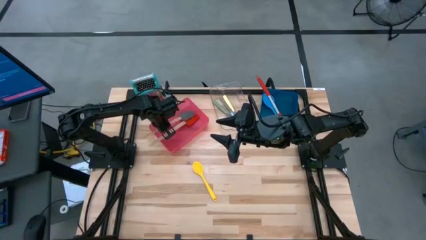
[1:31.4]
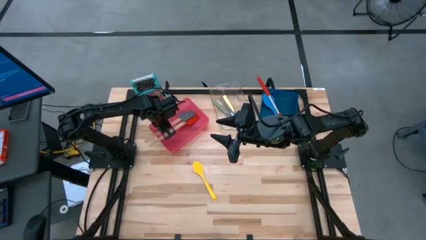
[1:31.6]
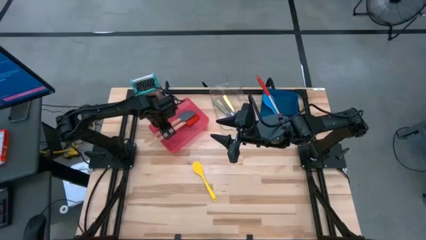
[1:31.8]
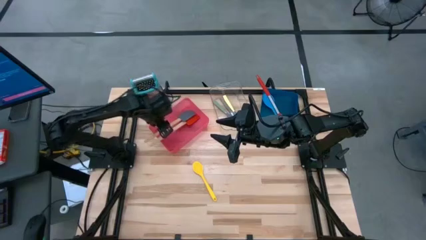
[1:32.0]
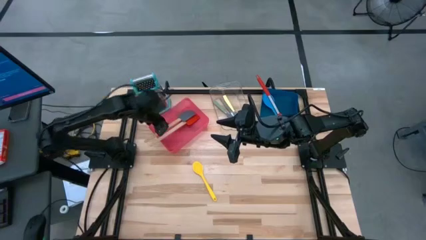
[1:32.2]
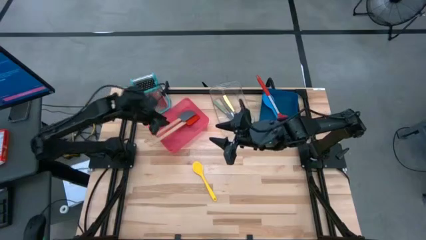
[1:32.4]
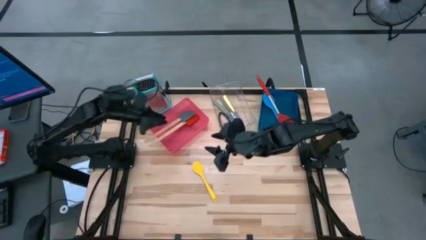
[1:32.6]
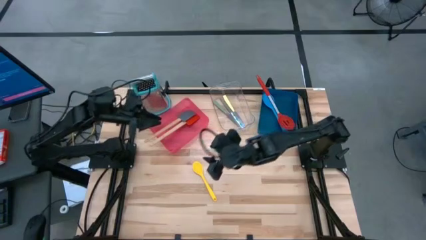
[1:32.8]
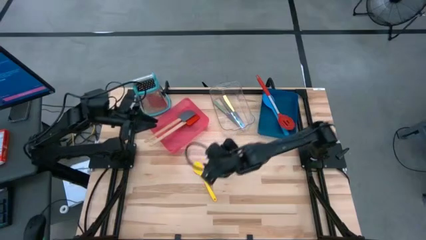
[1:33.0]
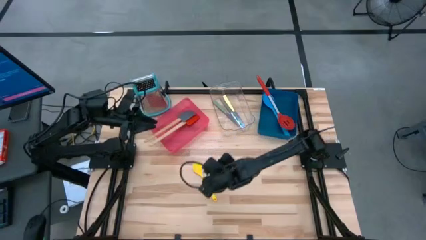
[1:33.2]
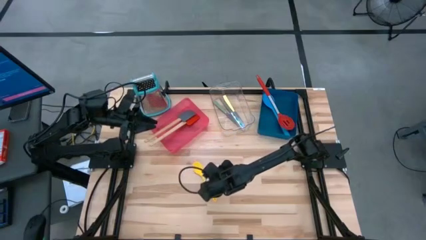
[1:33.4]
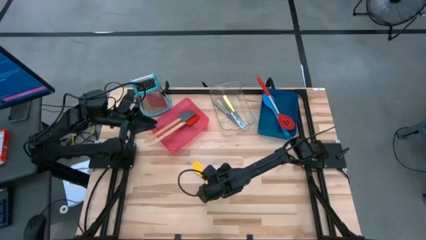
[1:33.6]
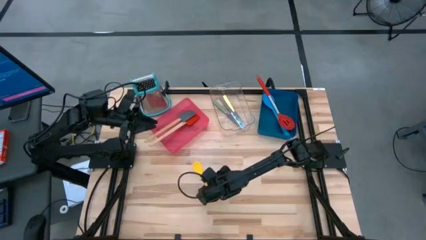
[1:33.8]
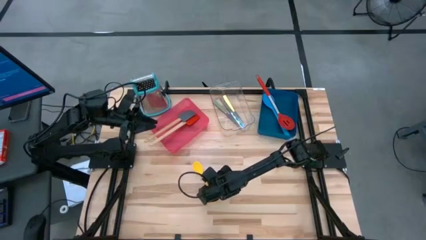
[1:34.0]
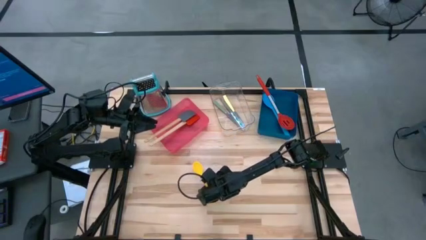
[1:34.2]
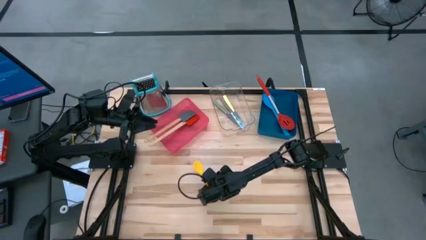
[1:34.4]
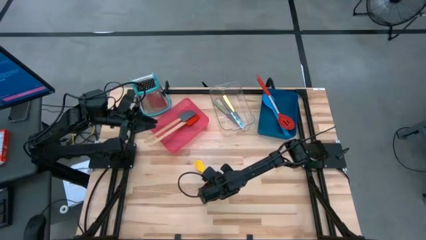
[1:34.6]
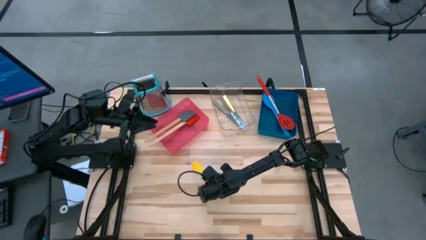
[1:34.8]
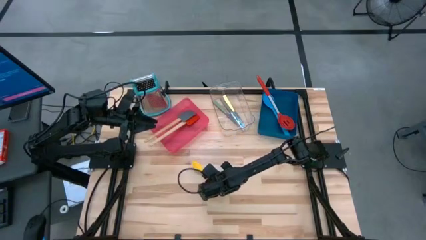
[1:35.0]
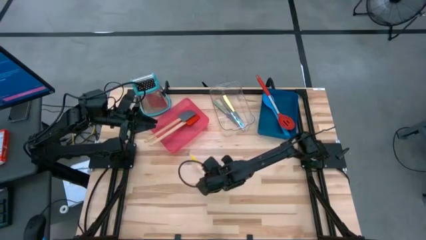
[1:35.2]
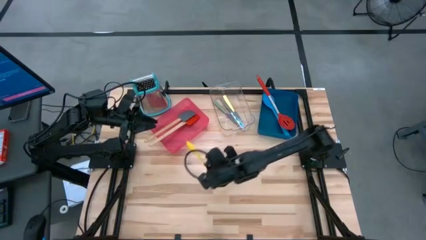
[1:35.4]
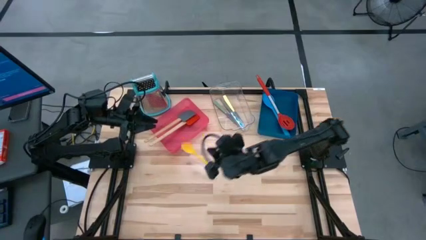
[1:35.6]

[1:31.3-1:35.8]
Task: Pick & Place Kitchen Items
Put the yellow serving spoon into the blue bin

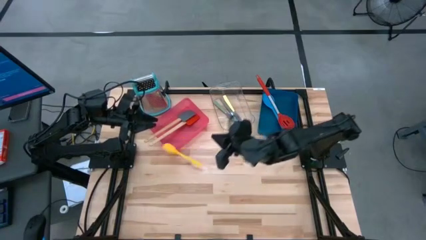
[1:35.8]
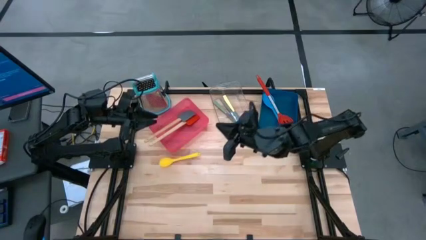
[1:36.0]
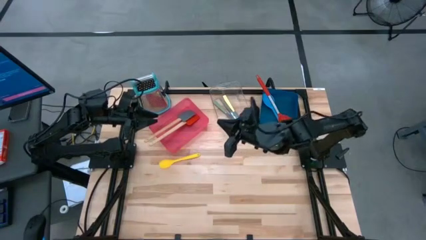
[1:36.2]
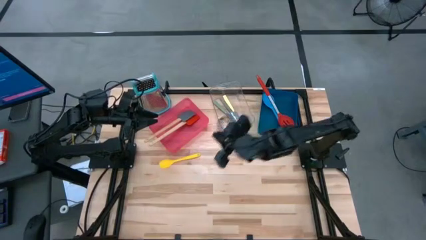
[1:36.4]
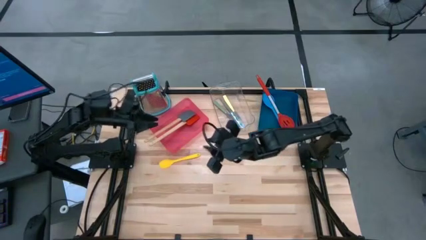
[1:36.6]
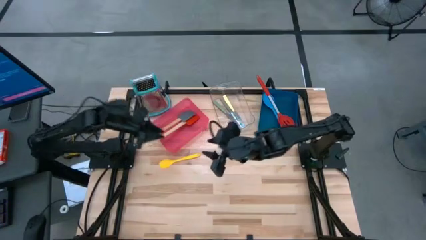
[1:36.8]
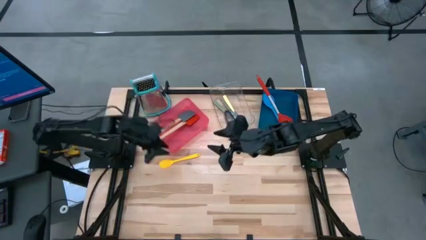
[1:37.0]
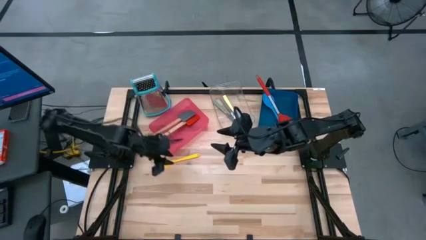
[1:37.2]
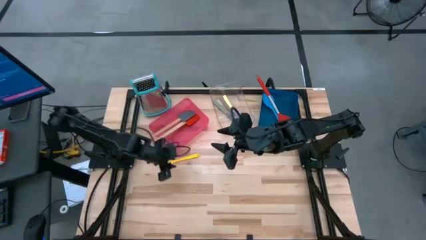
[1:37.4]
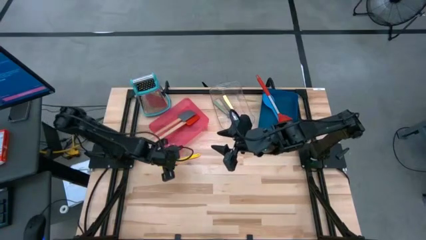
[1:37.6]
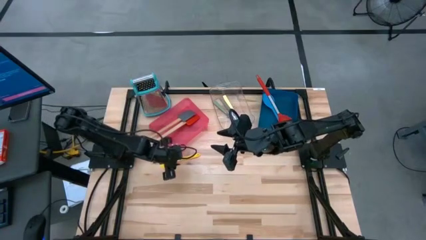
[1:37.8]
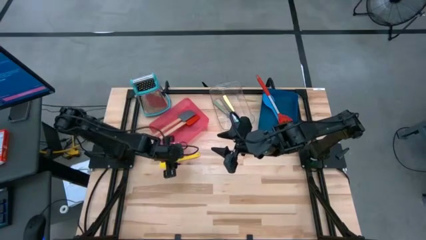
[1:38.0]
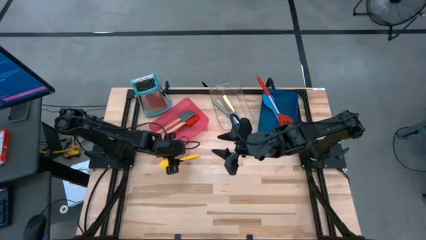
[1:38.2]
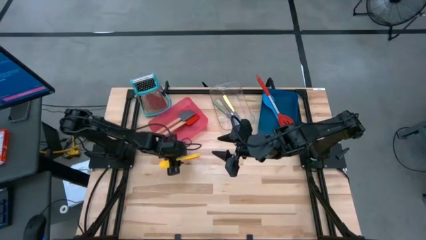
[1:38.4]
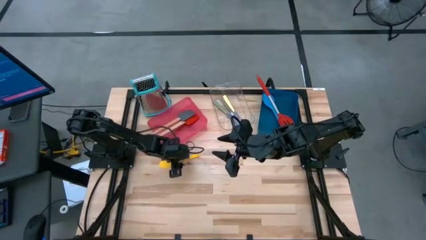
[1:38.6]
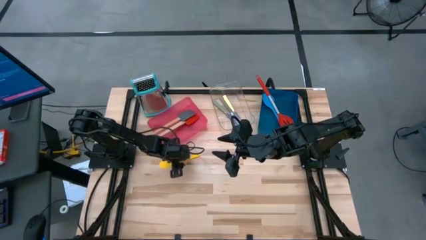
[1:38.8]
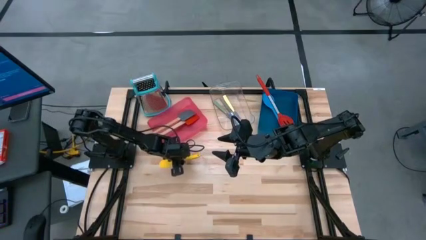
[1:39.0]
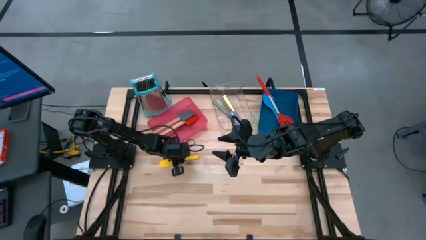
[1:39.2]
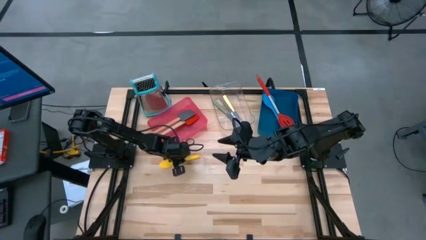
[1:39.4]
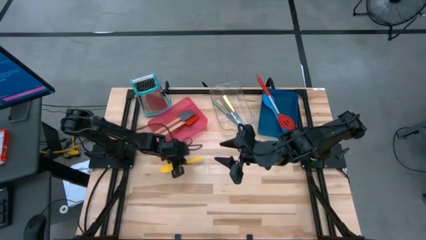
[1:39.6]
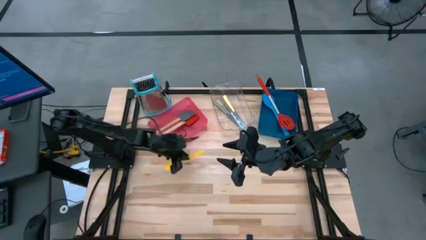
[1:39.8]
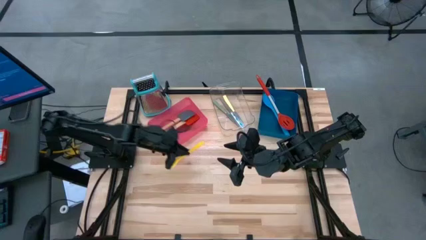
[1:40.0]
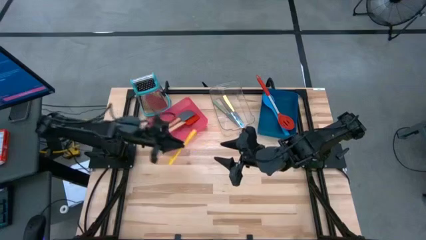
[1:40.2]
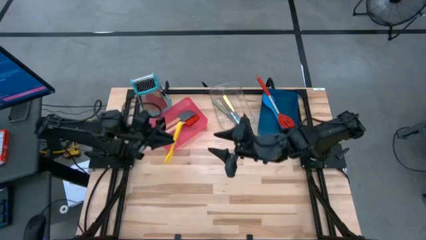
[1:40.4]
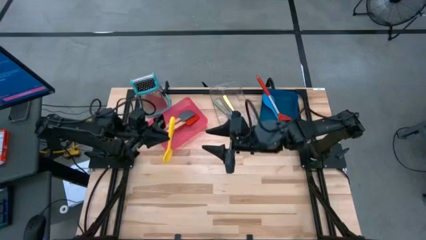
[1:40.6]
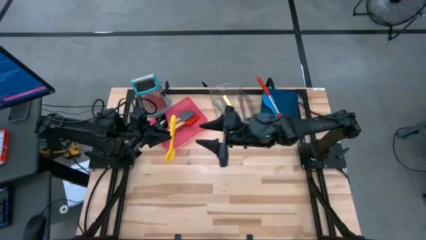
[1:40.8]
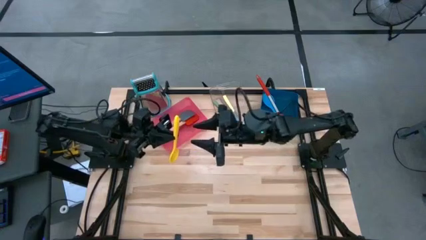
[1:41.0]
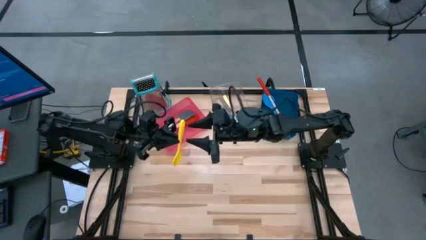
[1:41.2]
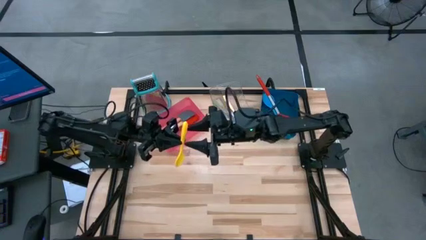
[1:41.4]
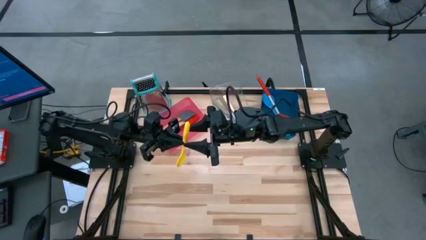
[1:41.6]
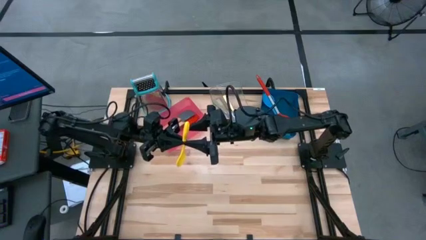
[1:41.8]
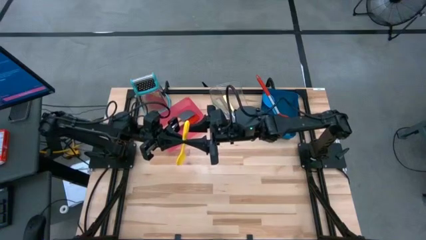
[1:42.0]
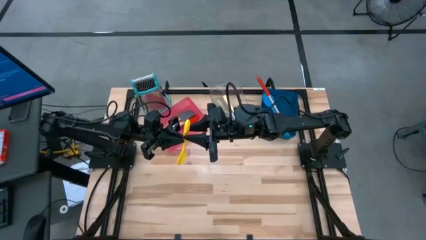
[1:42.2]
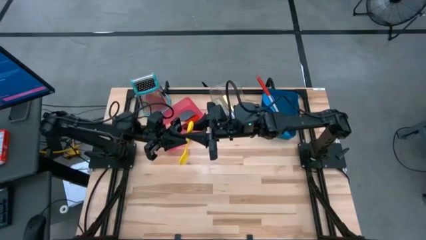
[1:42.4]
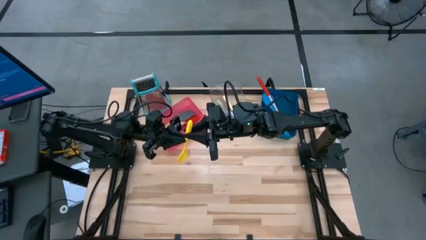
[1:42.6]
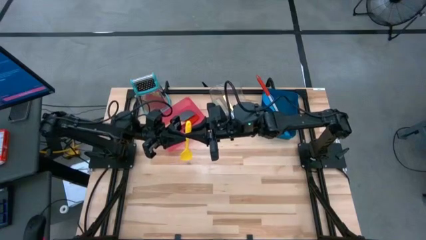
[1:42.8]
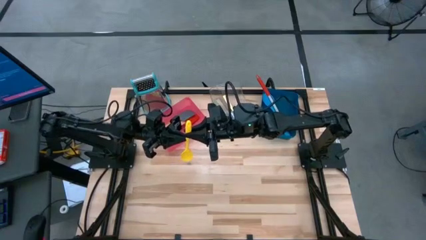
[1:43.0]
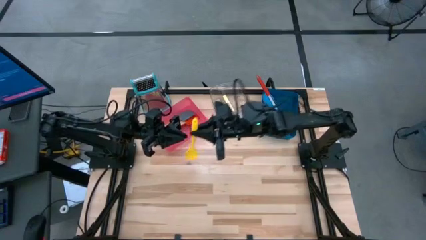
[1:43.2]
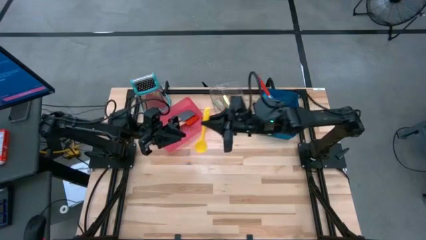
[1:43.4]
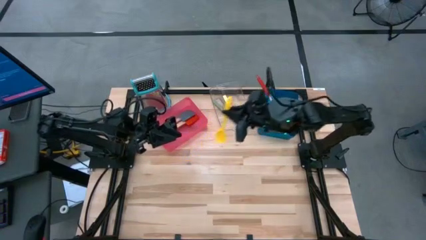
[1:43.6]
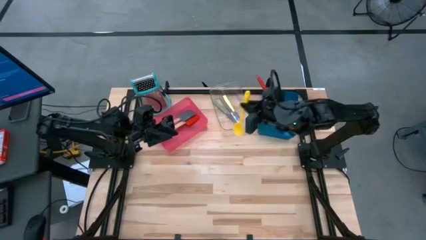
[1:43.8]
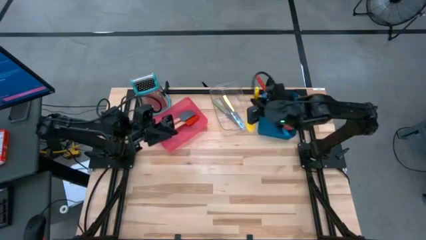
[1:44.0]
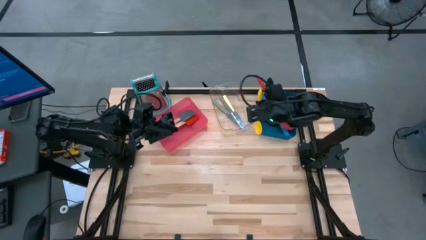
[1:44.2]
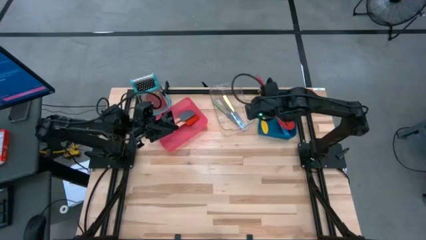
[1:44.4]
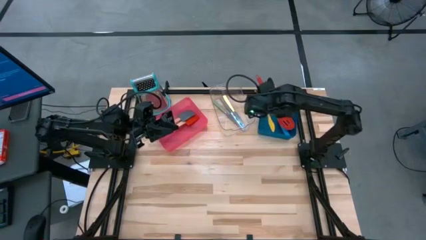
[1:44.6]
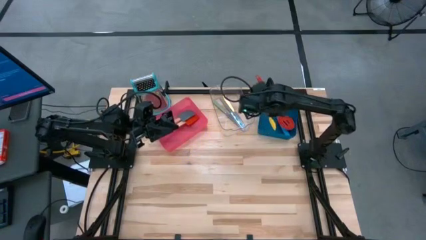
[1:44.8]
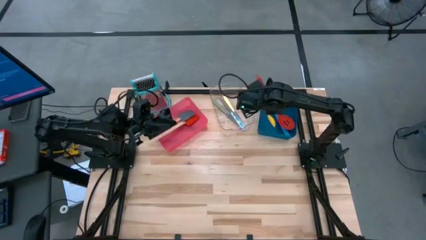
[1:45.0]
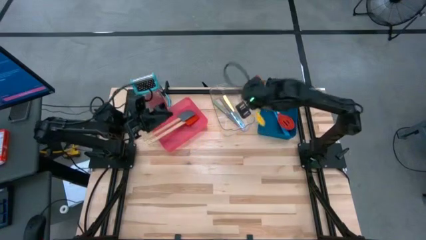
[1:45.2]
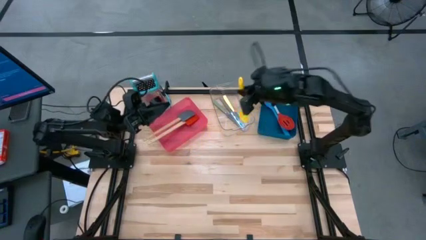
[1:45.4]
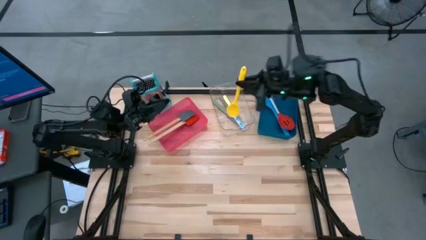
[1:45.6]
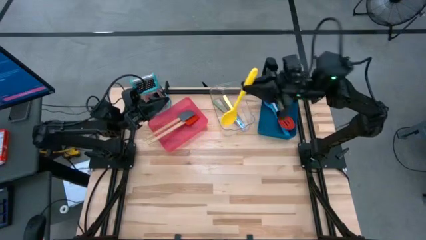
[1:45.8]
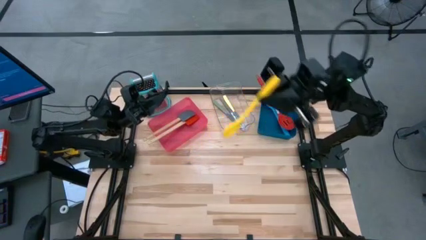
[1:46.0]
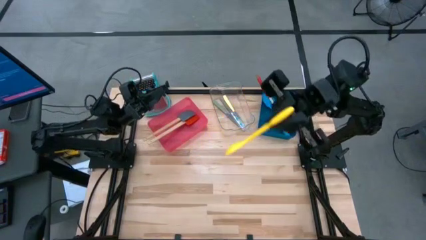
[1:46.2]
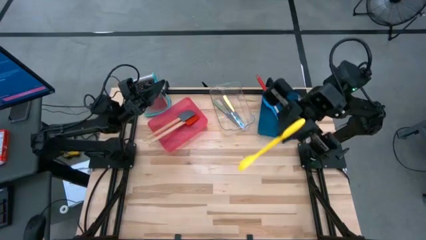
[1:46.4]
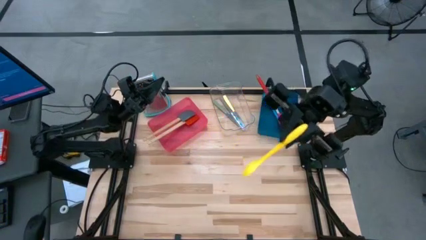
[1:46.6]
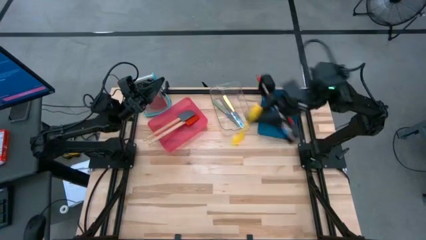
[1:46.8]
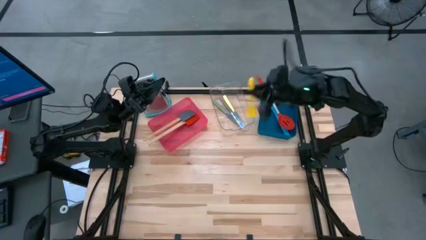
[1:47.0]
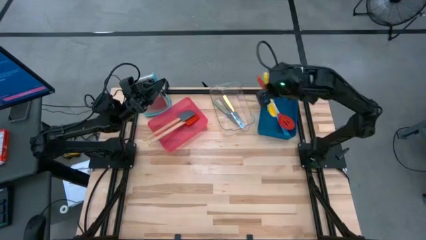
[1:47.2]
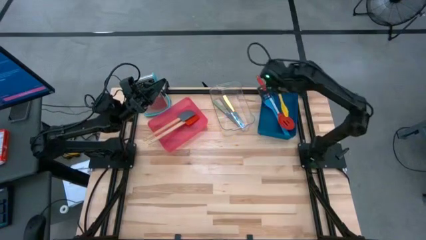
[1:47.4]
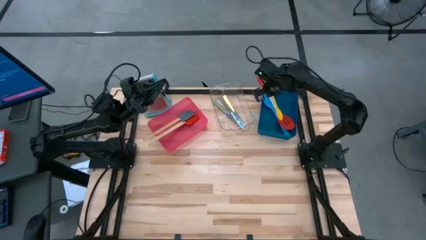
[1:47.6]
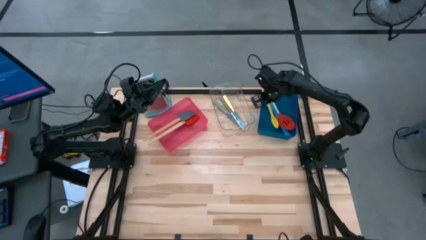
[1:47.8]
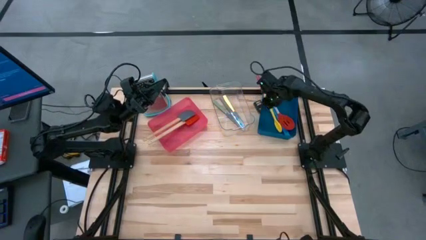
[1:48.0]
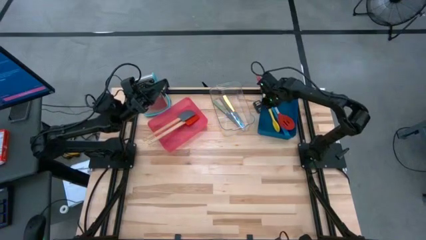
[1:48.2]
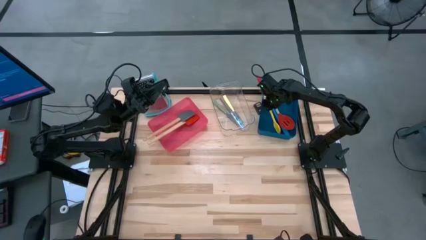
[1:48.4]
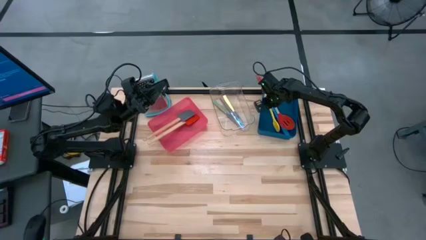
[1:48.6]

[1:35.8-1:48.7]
Put the yellow spoon into the blue bin
